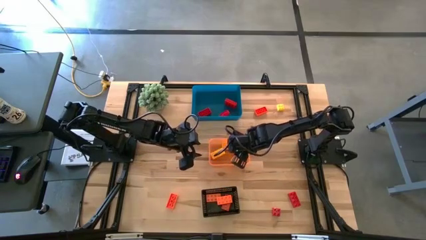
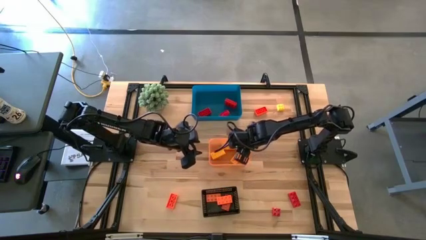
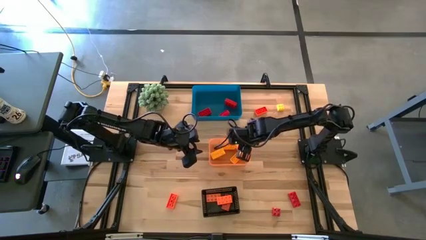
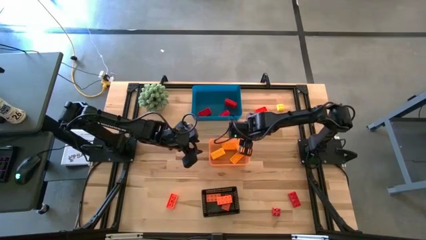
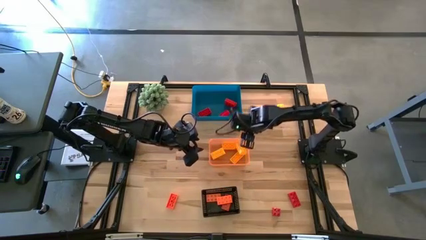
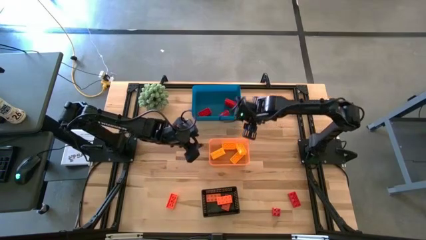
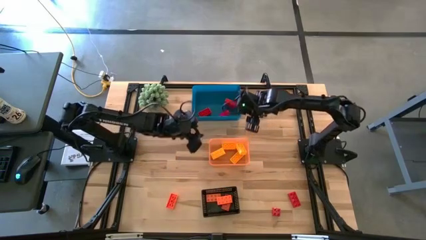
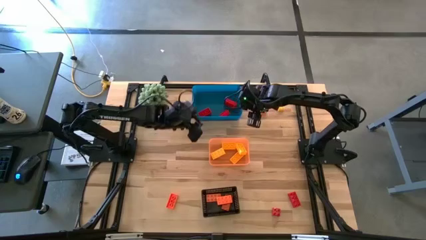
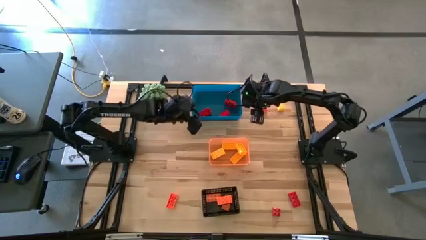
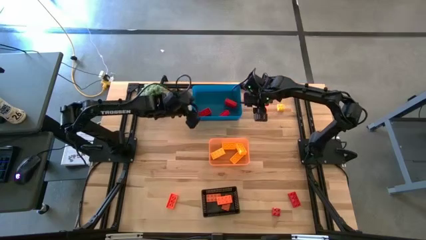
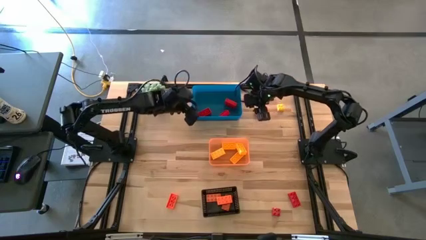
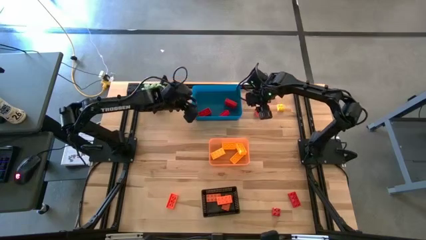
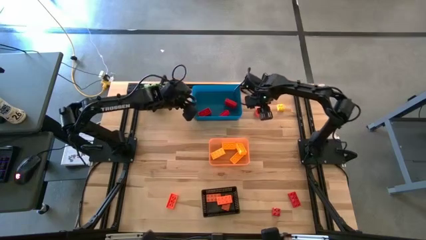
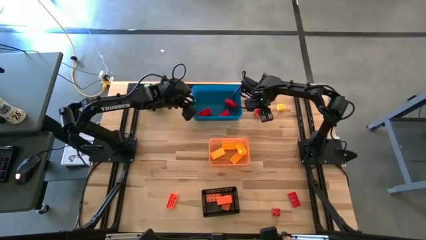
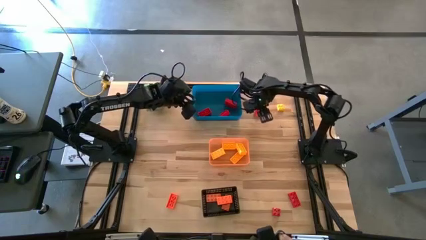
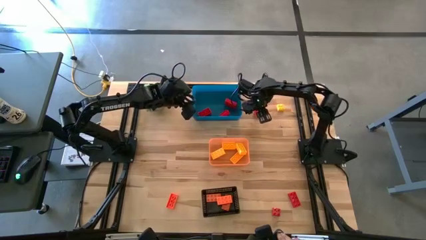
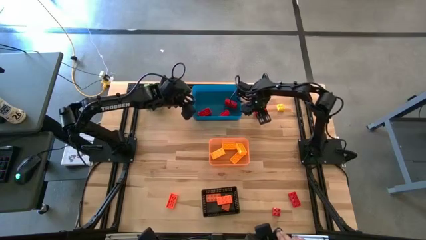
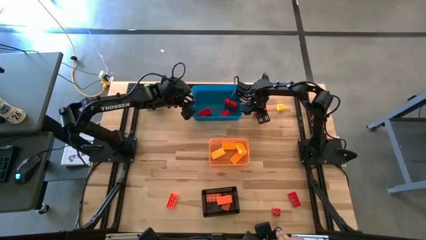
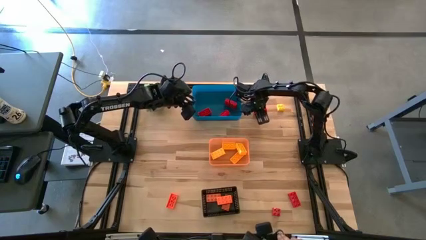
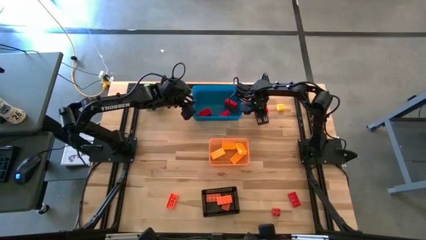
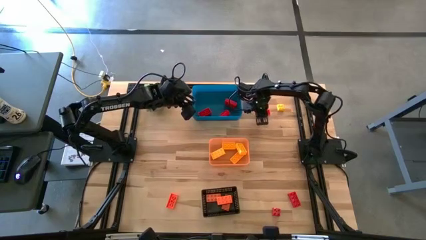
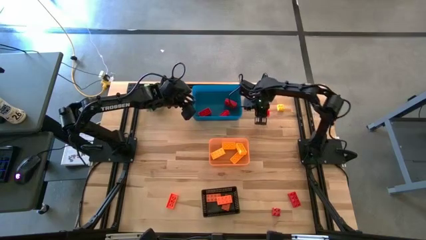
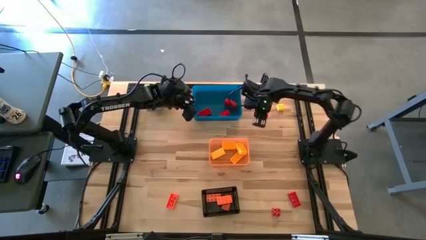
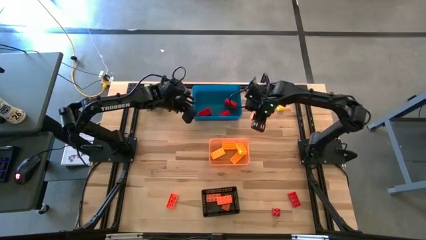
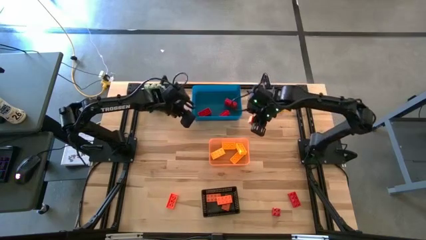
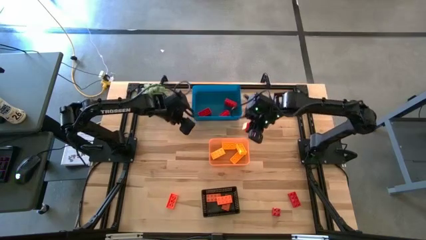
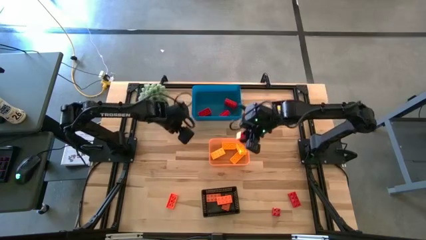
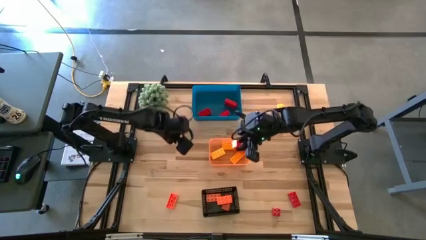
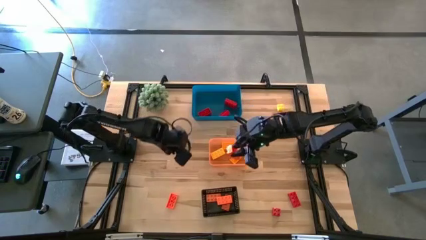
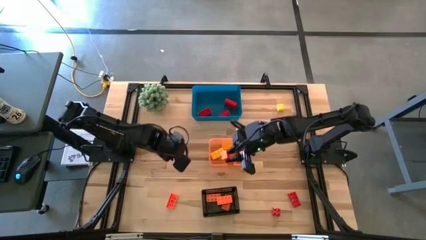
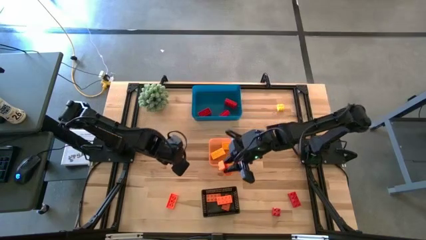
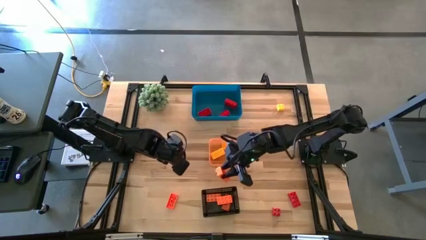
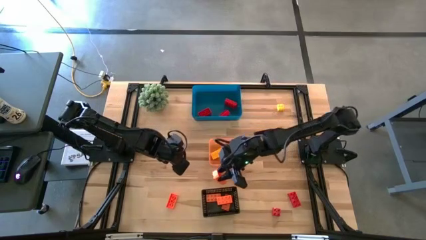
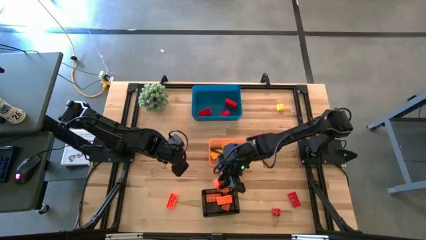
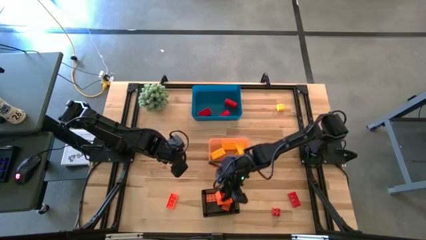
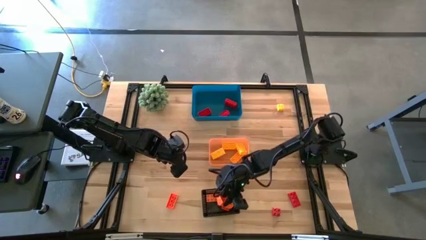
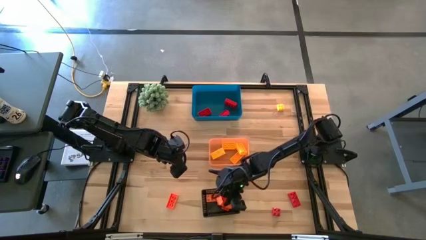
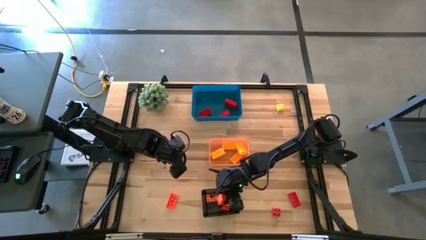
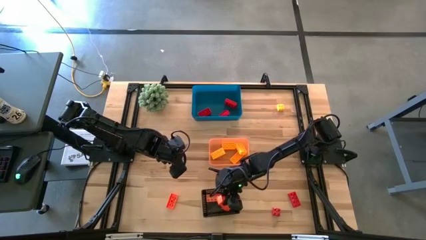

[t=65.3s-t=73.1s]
Task: Sort & place blocks by color
Put the orange game piece into the black bin

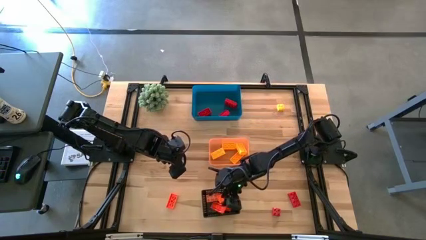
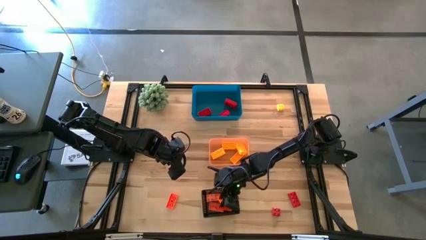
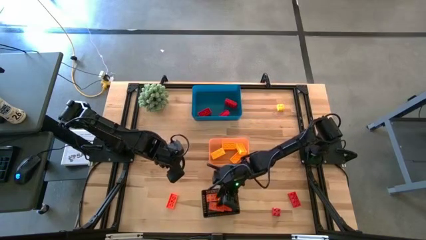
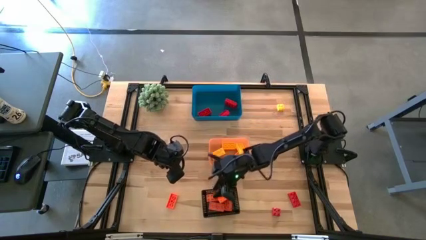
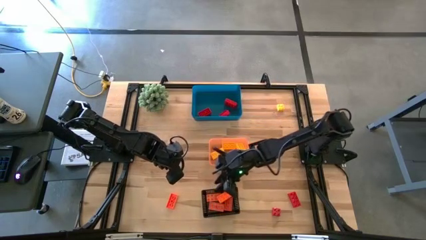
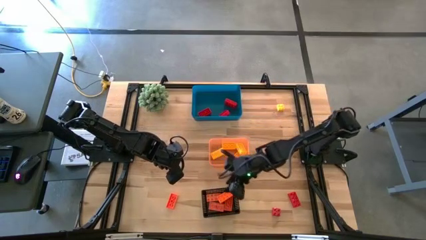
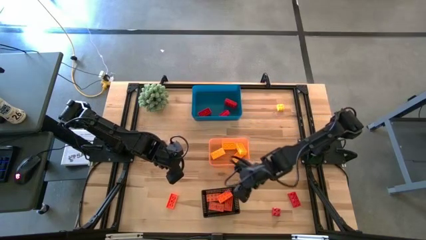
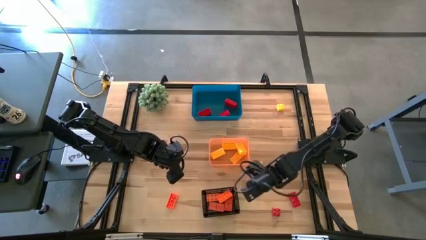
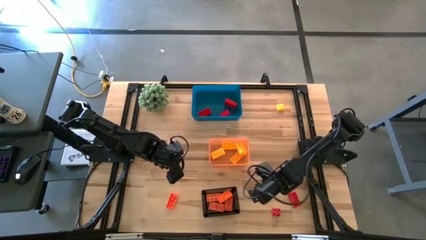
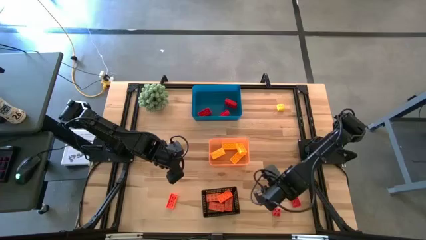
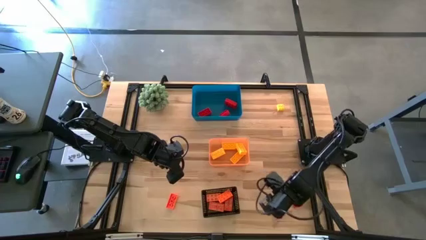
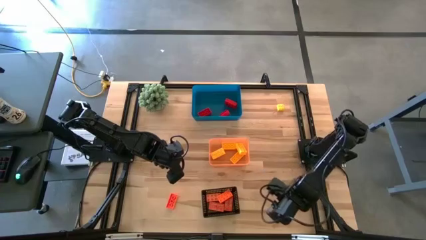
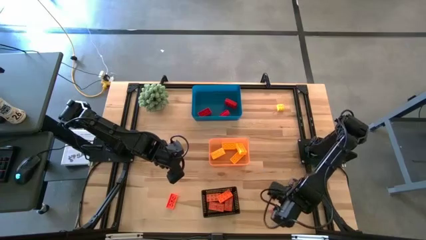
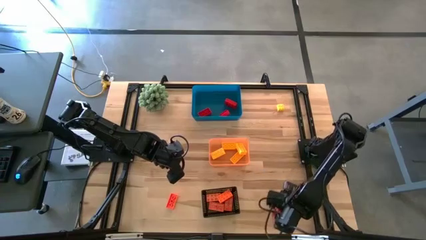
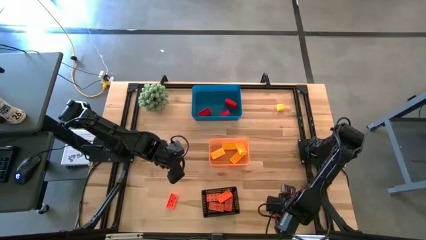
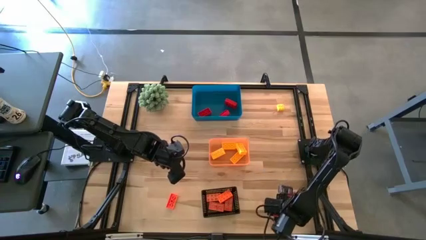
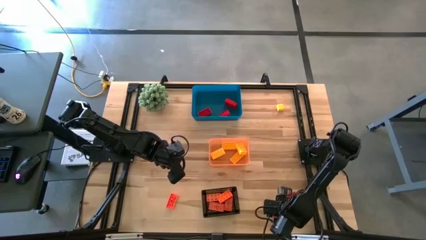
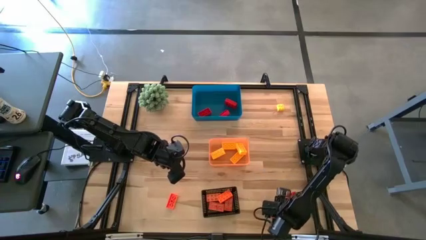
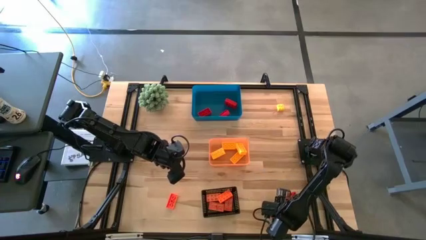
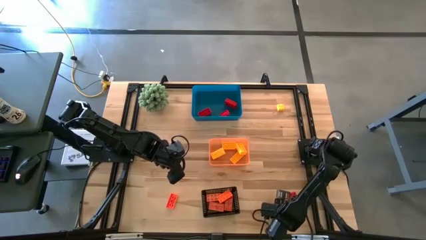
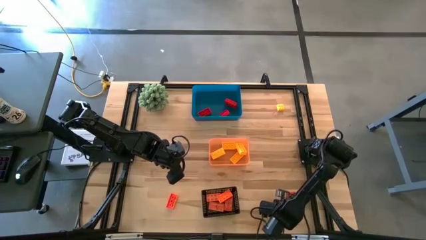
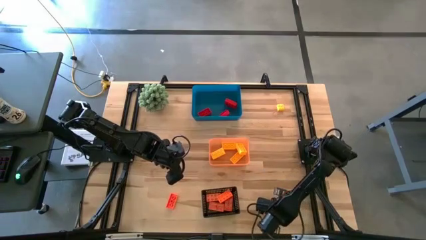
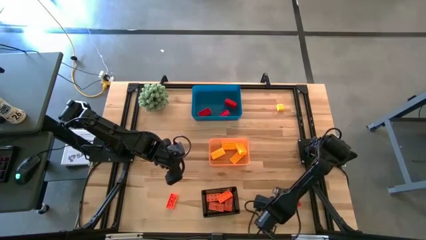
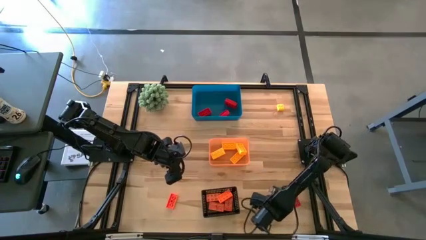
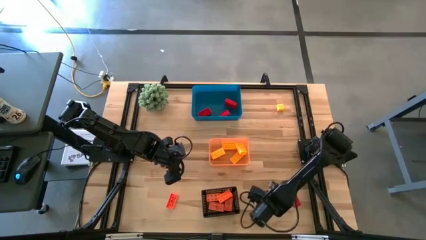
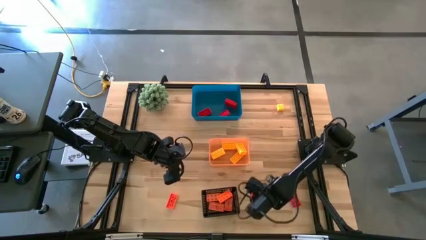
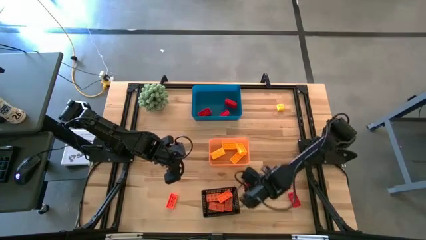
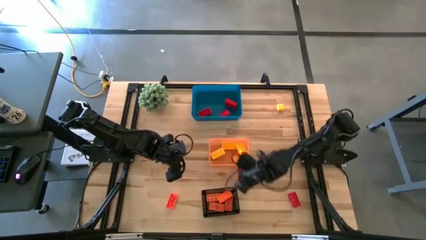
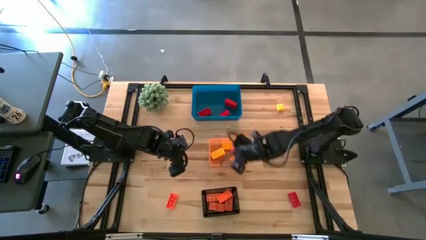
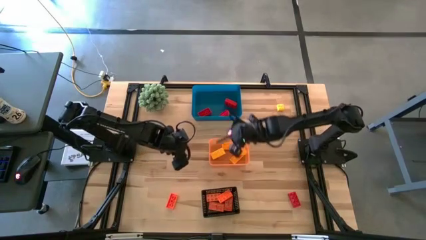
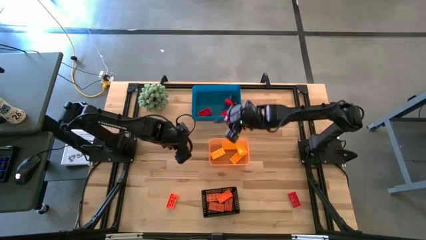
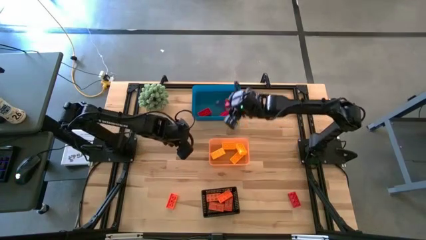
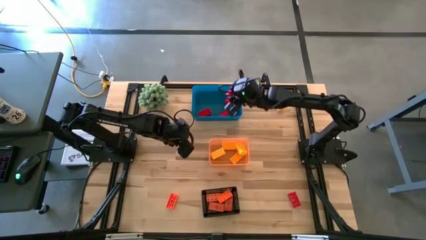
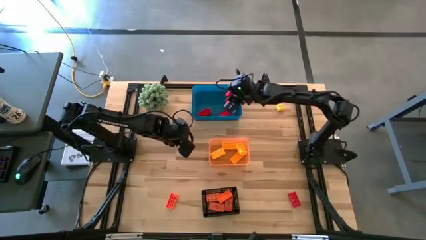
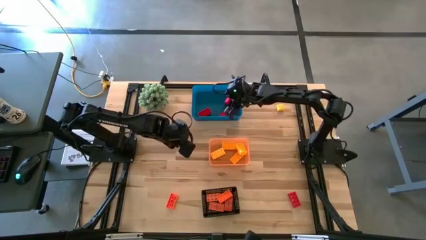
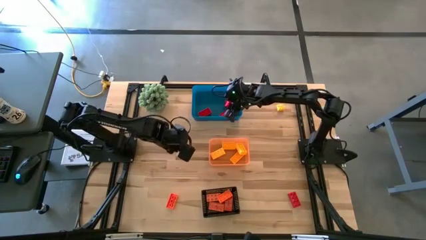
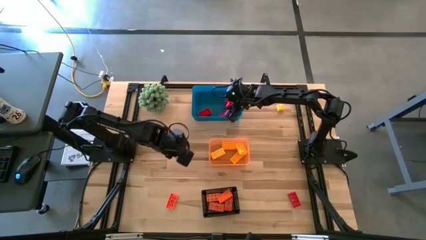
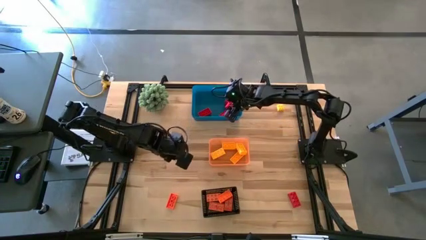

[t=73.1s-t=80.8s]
Put the red game piece into the blue bin
